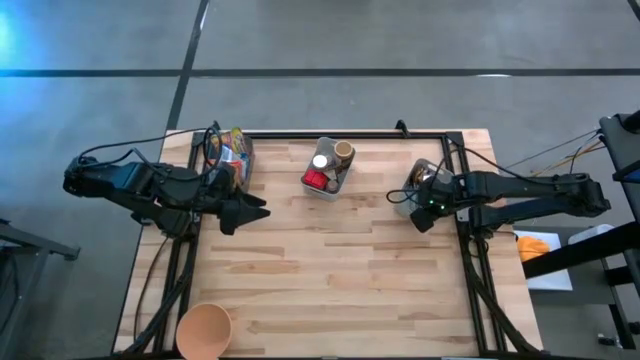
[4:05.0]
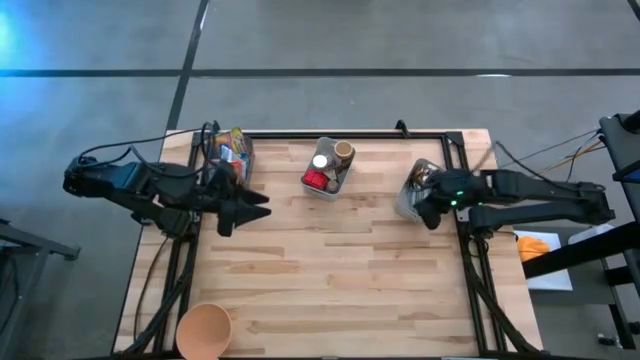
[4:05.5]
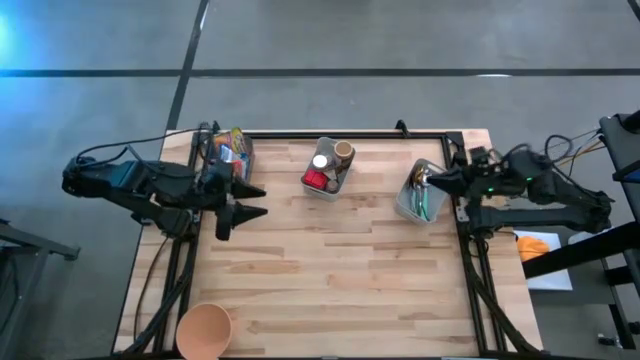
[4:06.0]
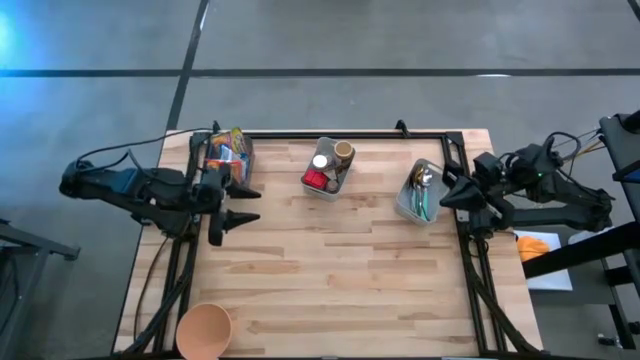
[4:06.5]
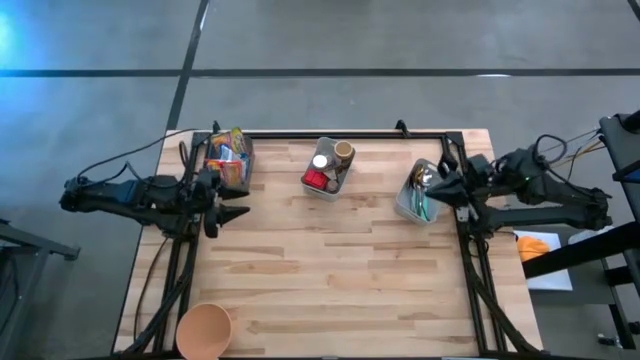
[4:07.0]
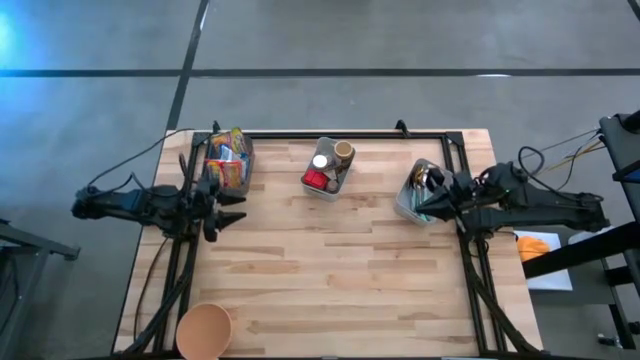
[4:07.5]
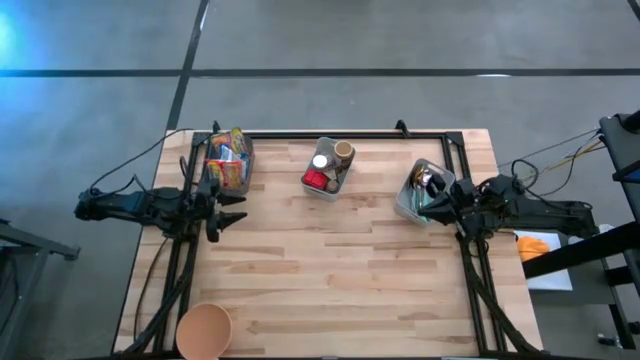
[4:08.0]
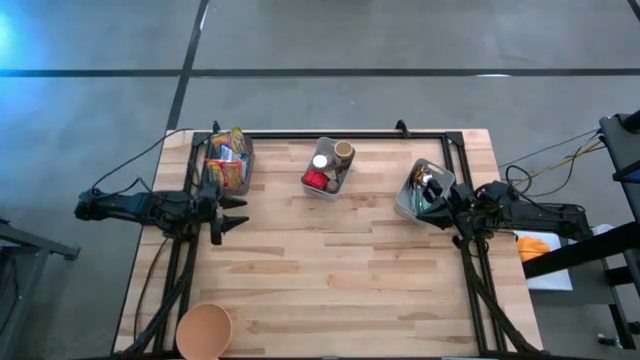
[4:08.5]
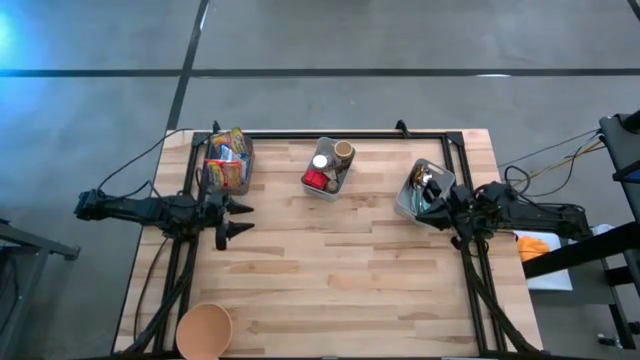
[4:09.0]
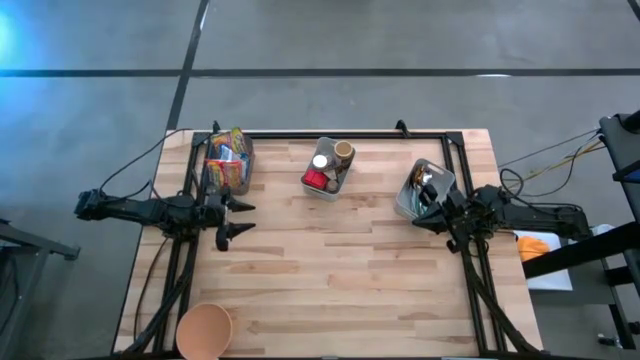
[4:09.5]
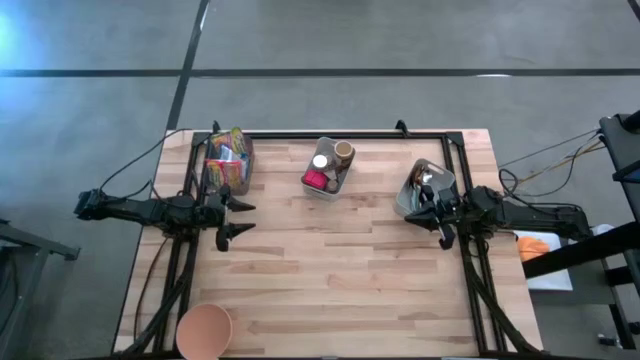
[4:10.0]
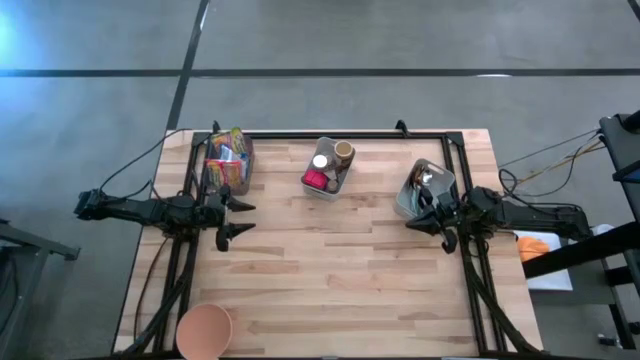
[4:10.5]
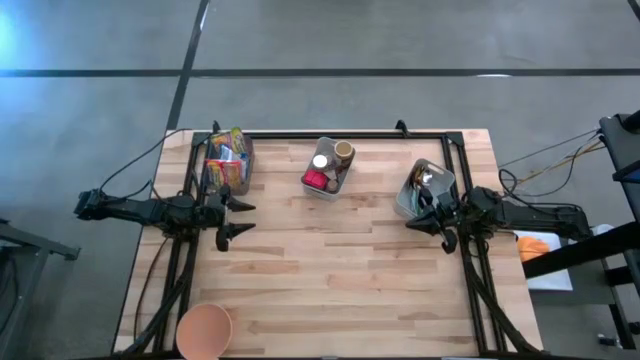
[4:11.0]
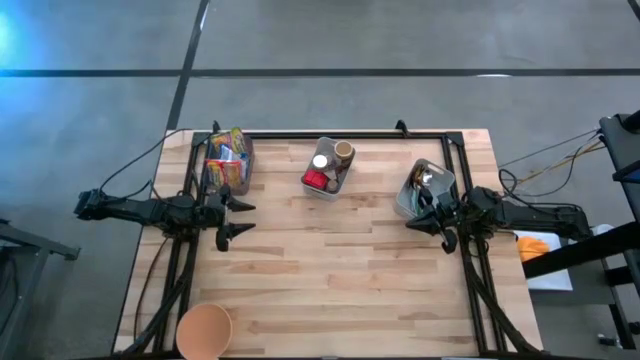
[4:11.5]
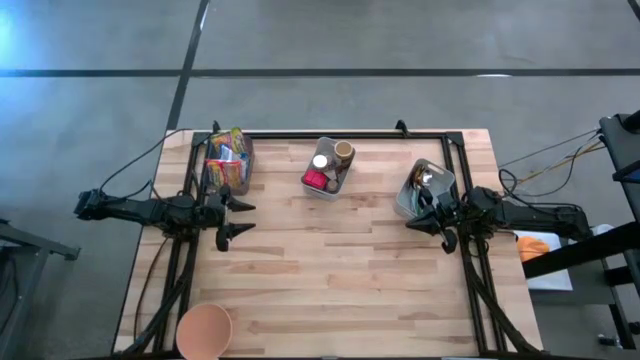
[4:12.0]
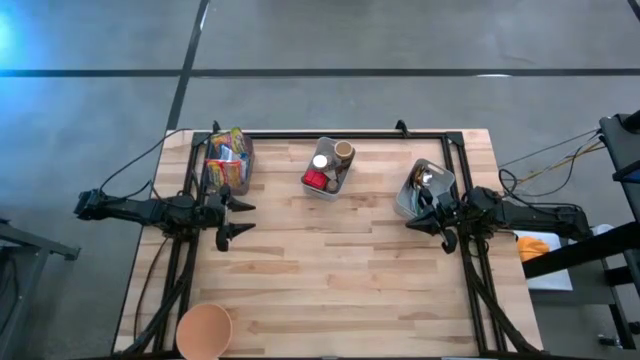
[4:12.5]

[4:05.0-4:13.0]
Return to Home Position

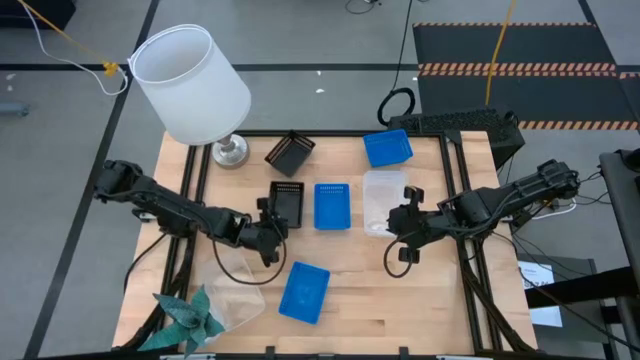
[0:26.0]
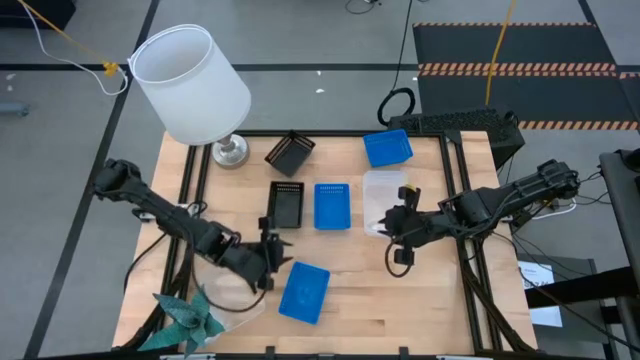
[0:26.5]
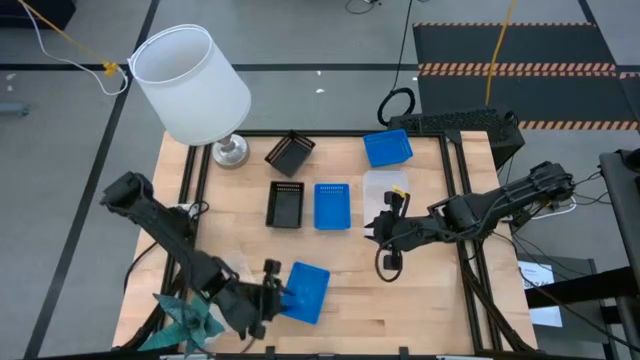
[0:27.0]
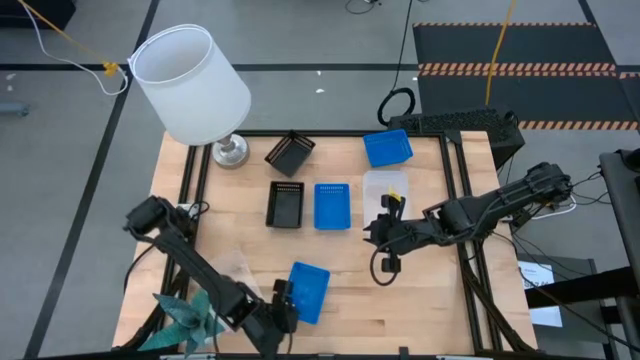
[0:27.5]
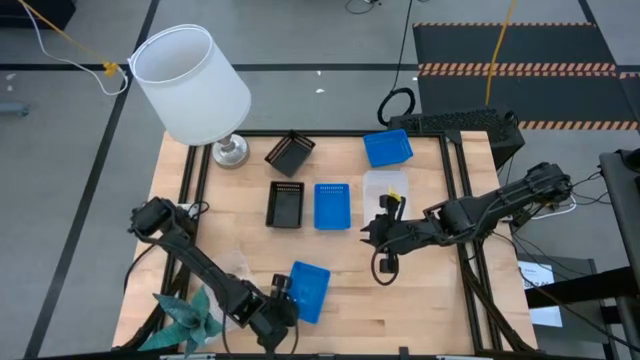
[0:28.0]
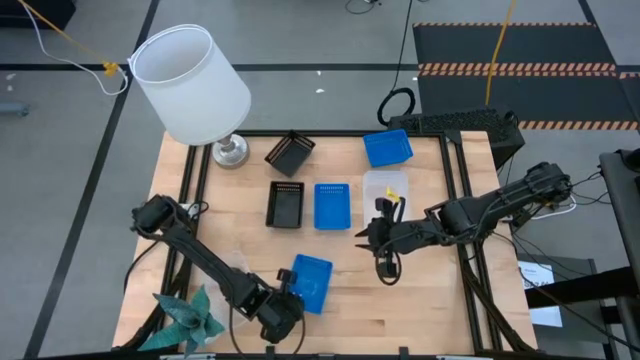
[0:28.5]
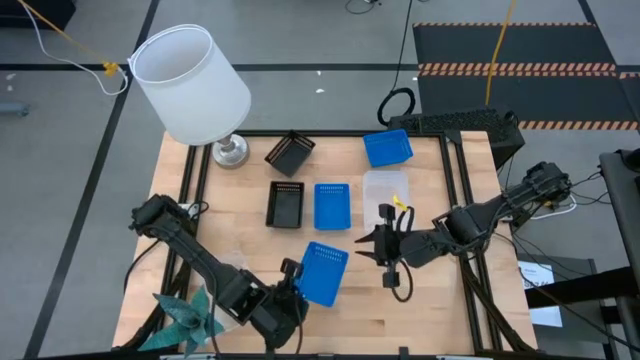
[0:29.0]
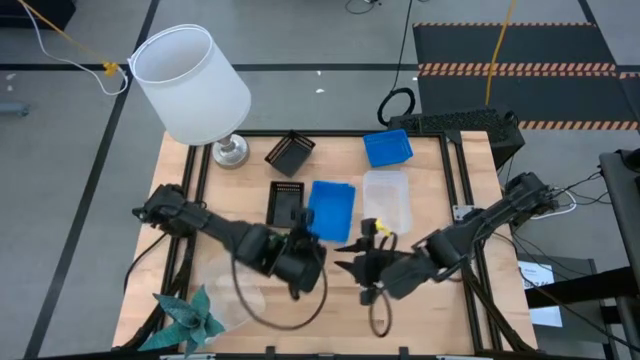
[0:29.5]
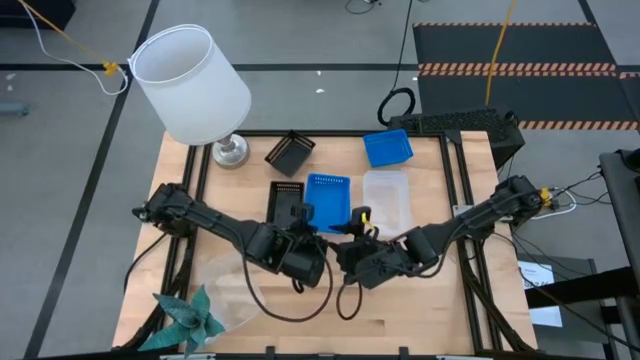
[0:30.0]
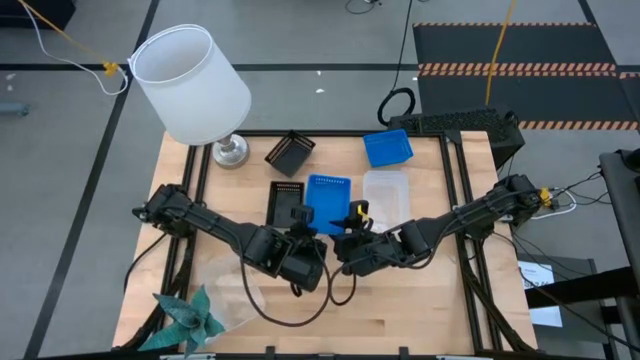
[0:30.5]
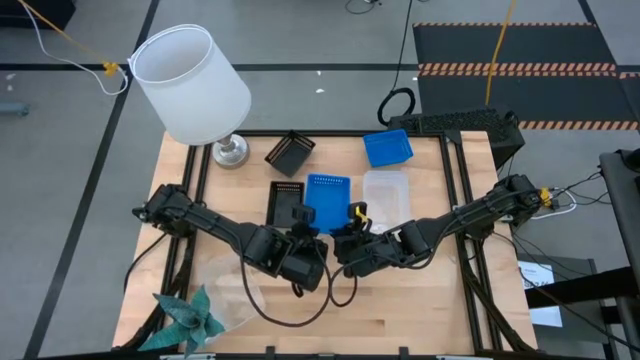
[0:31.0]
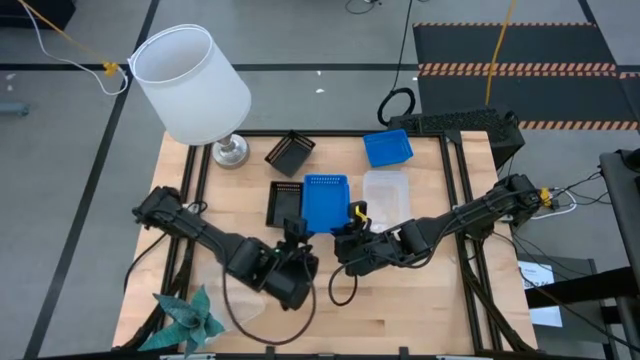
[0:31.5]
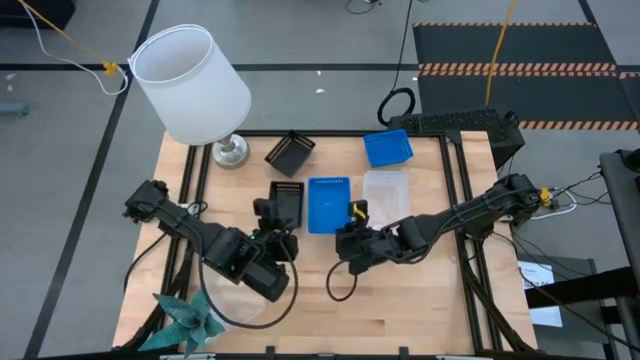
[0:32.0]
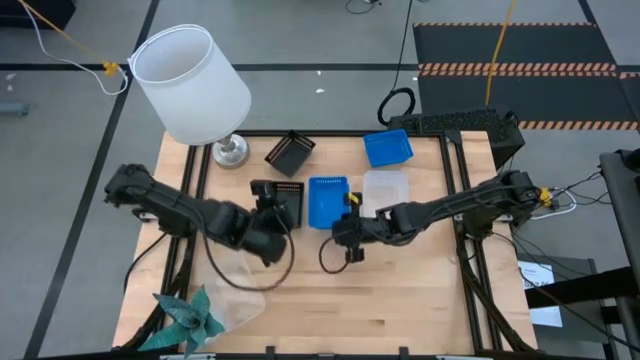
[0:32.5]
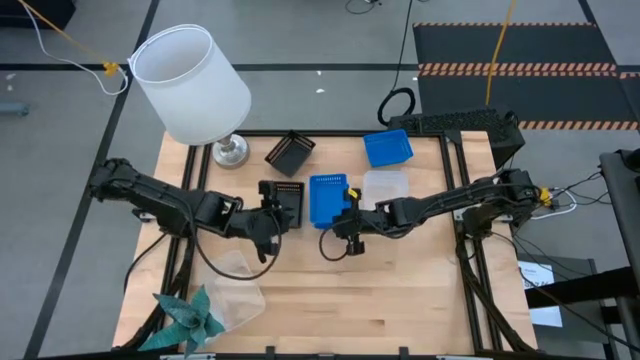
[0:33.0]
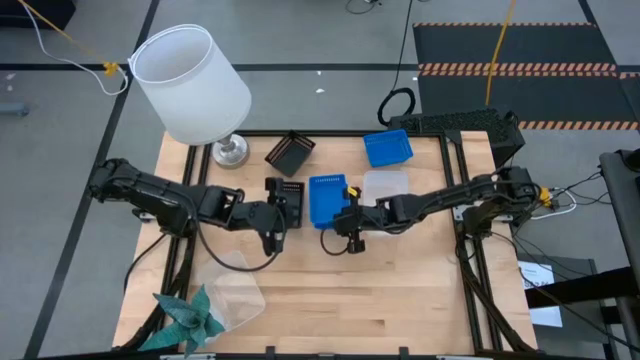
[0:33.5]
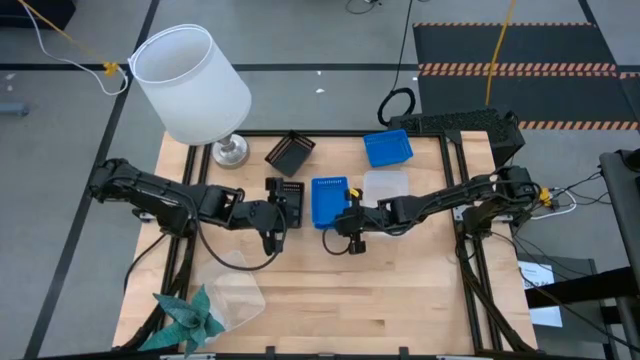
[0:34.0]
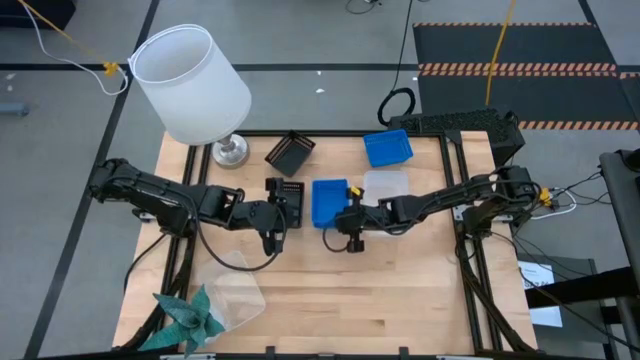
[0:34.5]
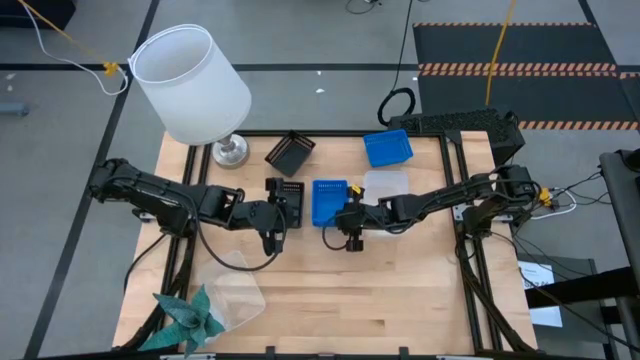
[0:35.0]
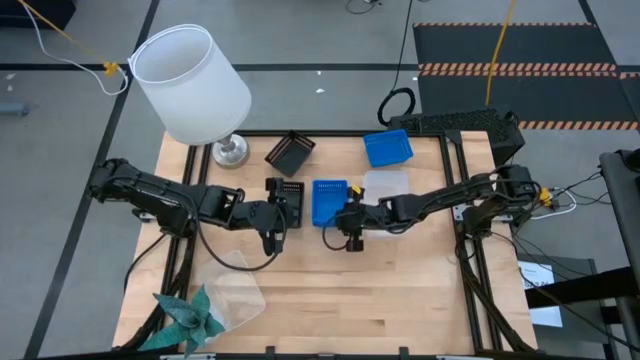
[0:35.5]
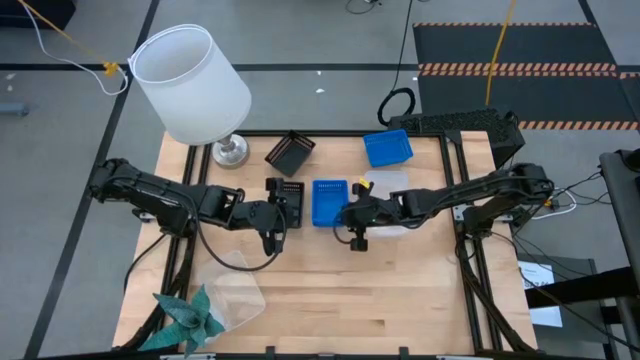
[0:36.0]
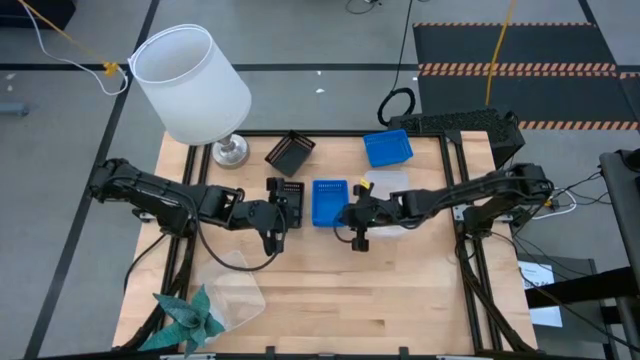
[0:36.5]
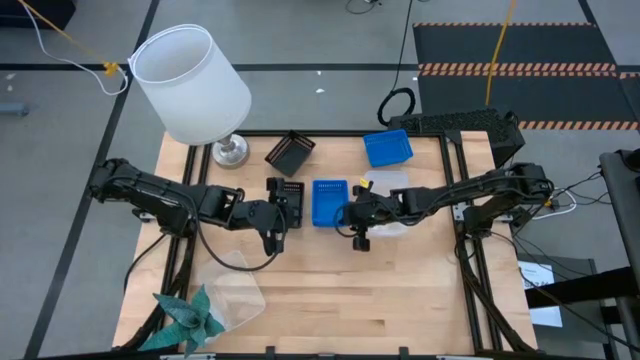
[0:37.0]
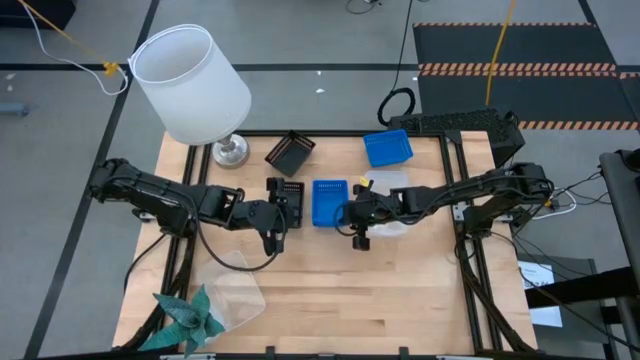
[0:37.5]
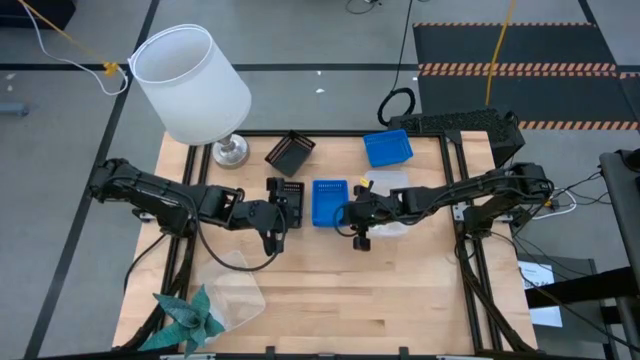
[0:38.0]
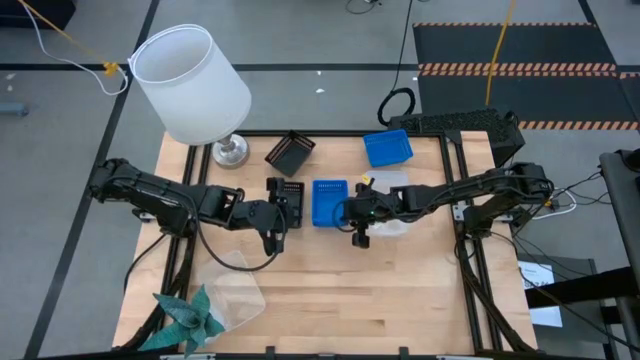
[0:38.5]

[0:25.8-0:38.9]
Stack the bottom blue bin on top of the middle blue bin
